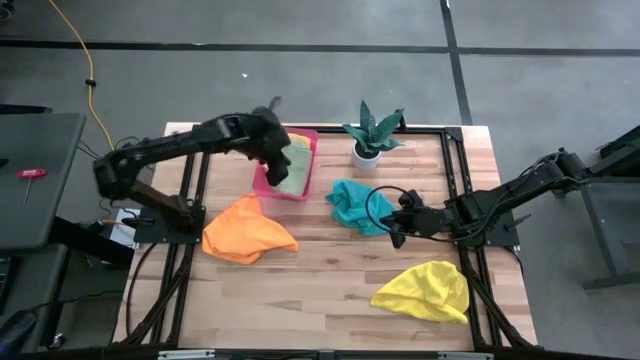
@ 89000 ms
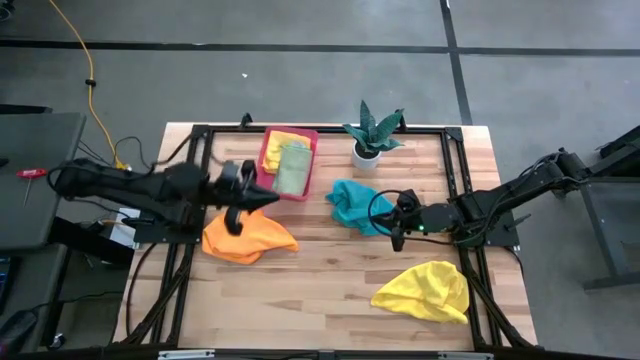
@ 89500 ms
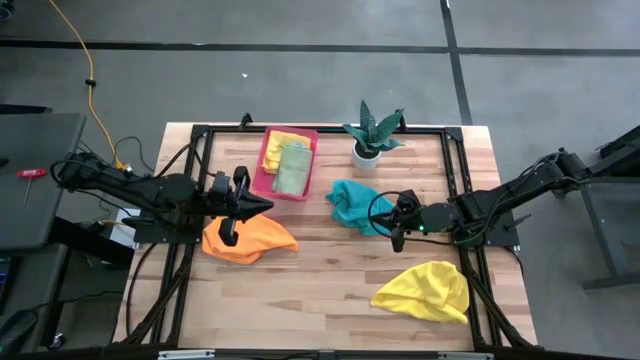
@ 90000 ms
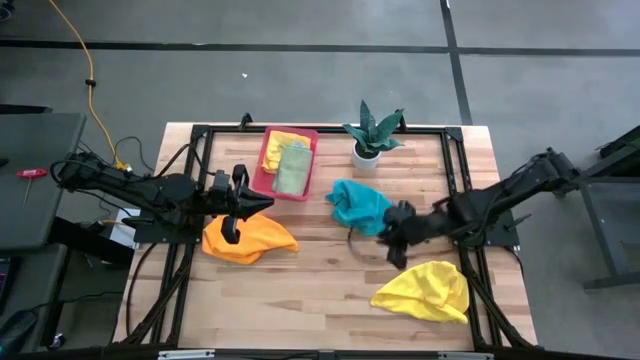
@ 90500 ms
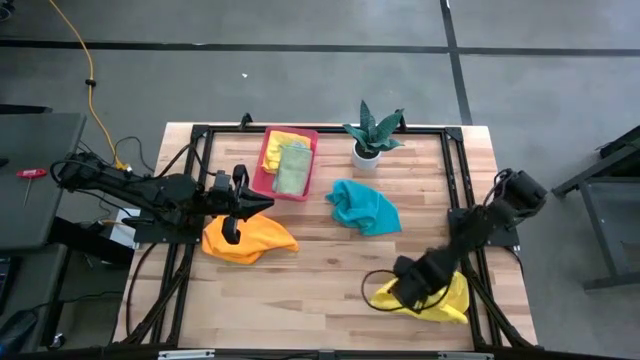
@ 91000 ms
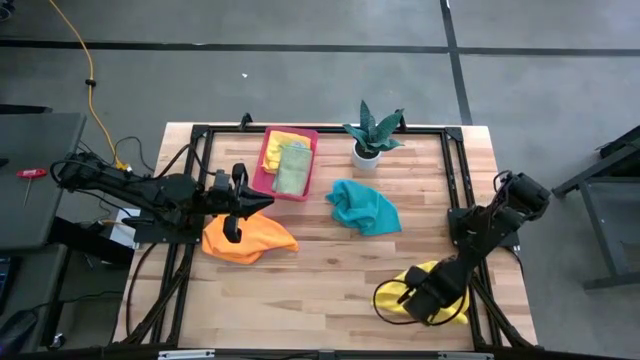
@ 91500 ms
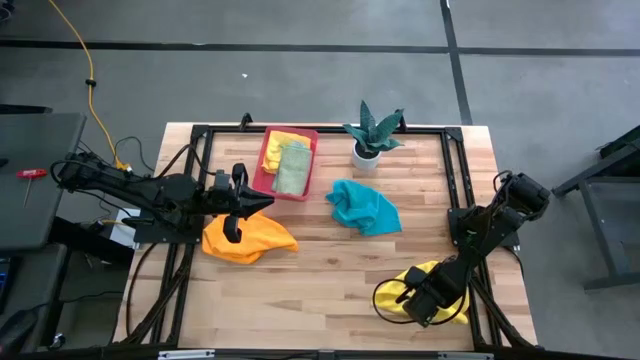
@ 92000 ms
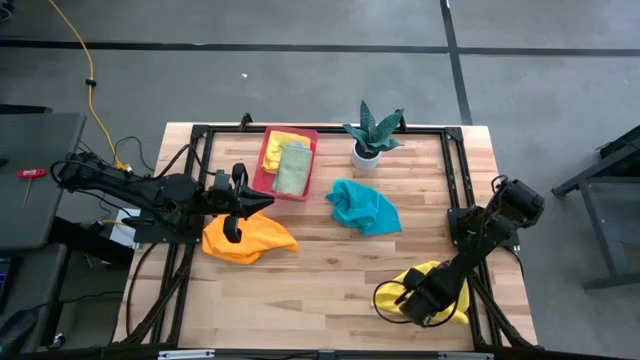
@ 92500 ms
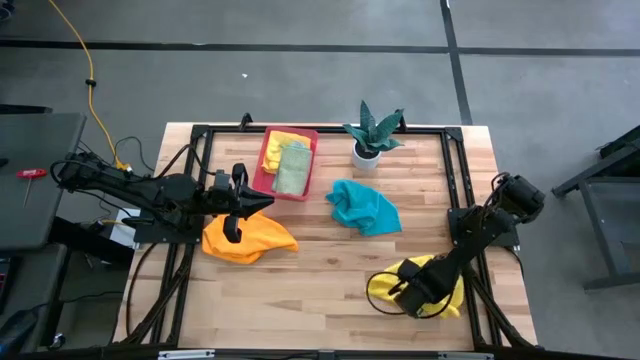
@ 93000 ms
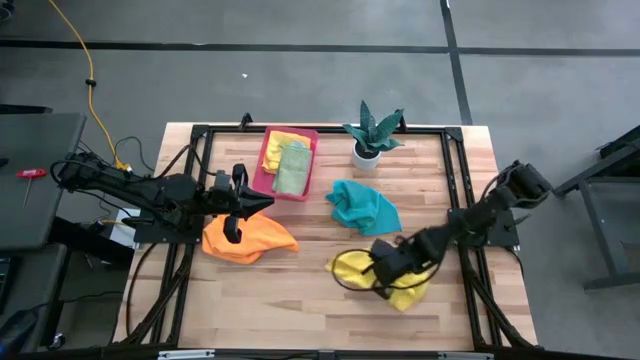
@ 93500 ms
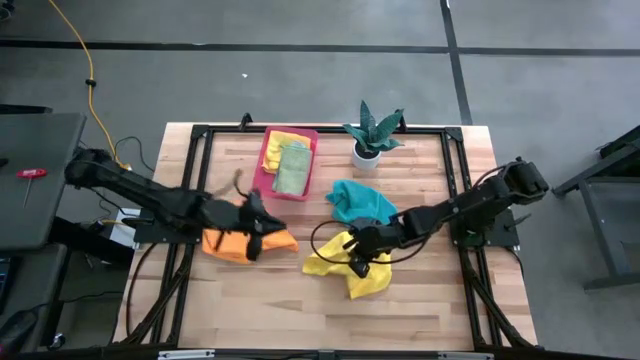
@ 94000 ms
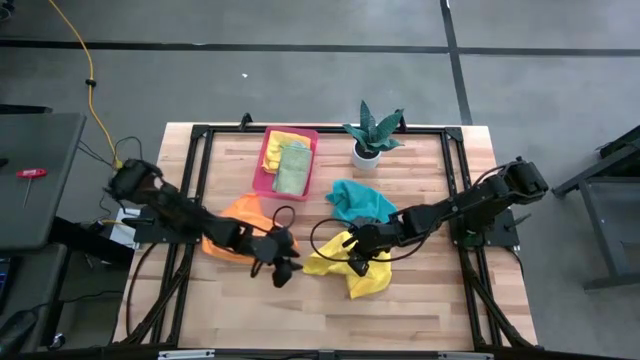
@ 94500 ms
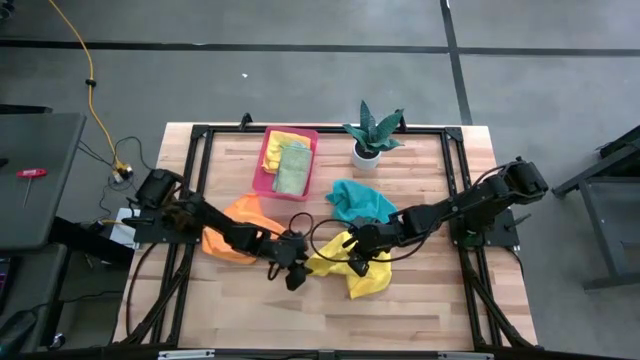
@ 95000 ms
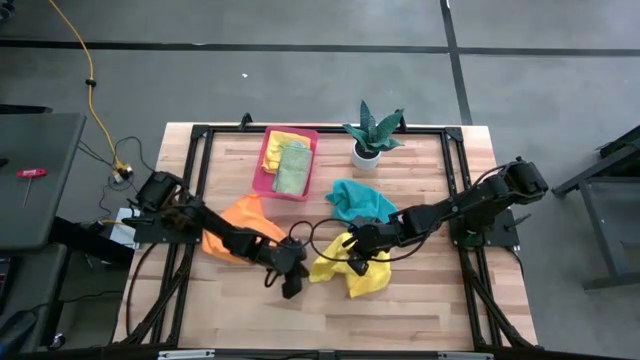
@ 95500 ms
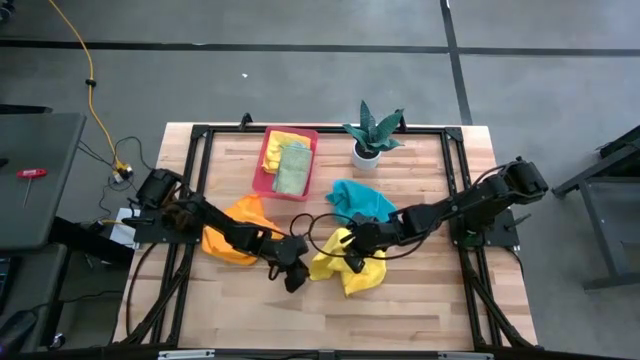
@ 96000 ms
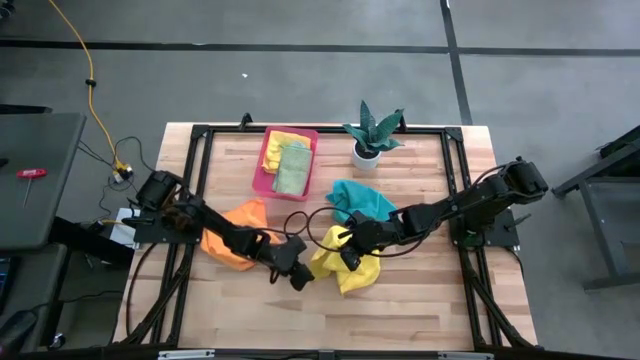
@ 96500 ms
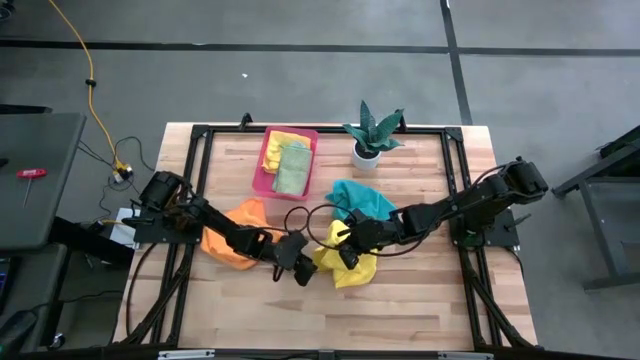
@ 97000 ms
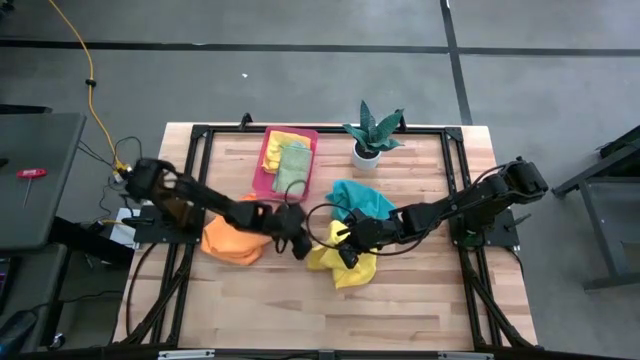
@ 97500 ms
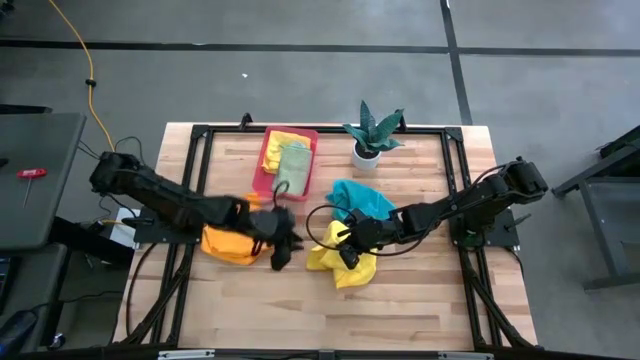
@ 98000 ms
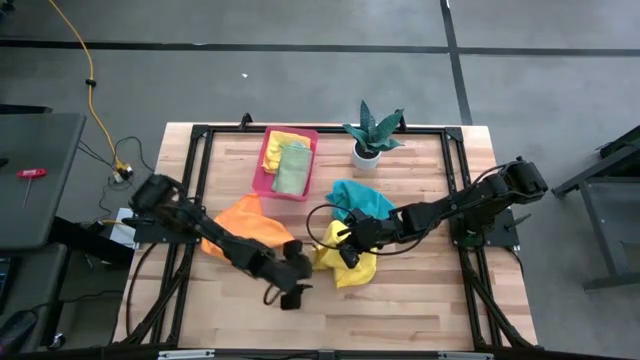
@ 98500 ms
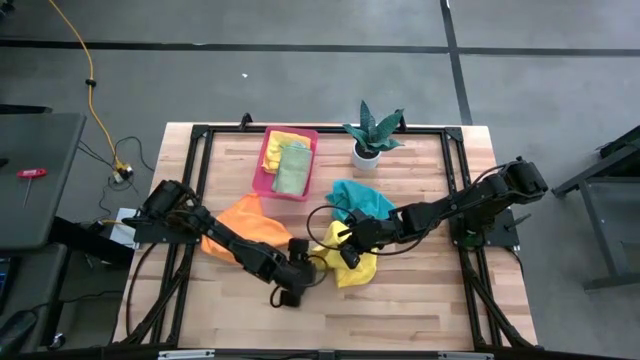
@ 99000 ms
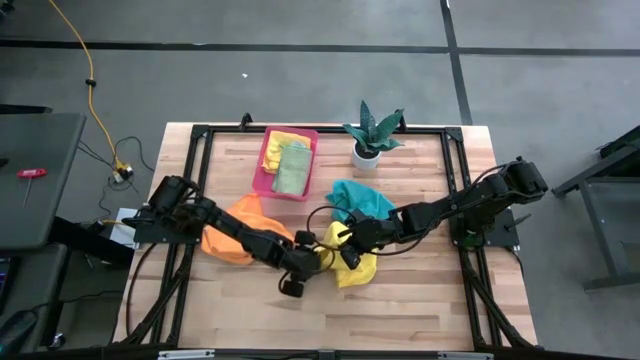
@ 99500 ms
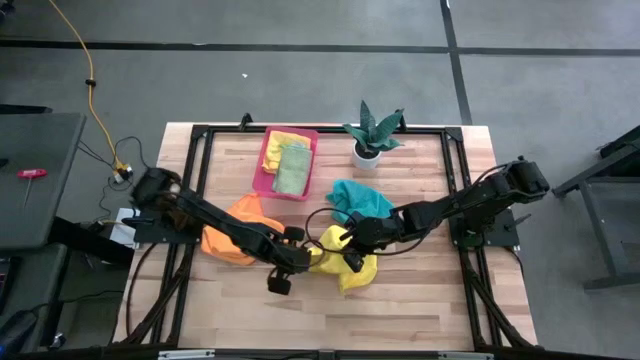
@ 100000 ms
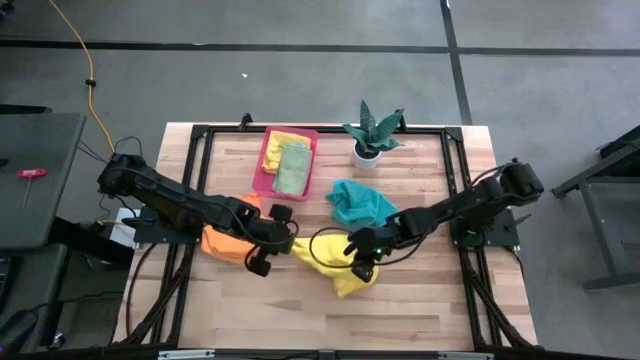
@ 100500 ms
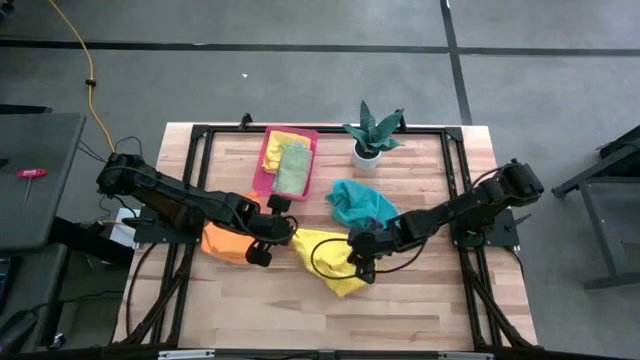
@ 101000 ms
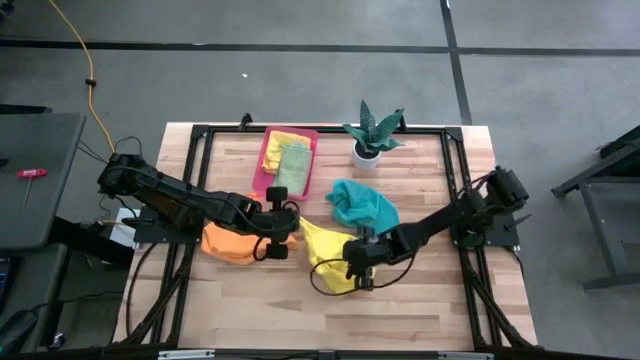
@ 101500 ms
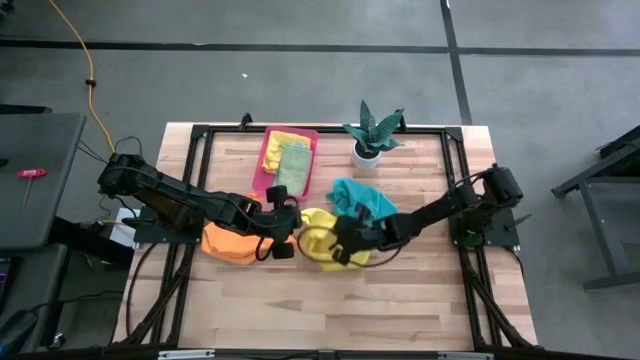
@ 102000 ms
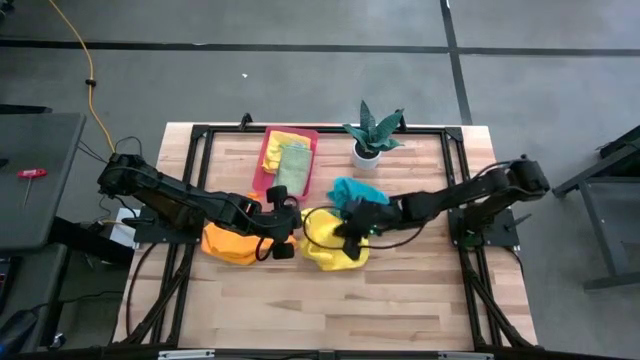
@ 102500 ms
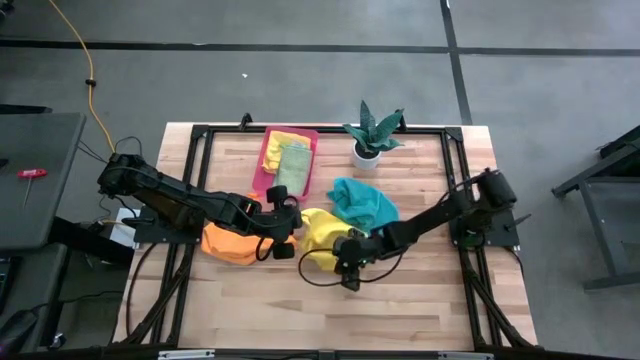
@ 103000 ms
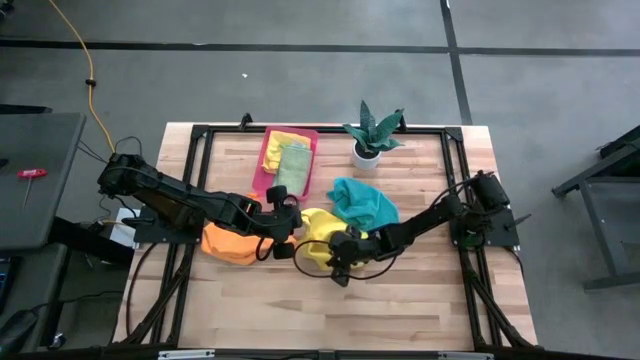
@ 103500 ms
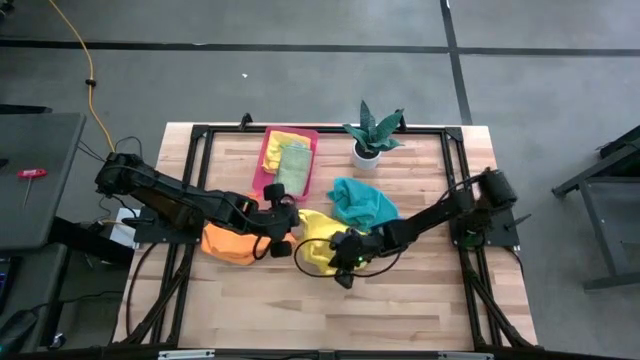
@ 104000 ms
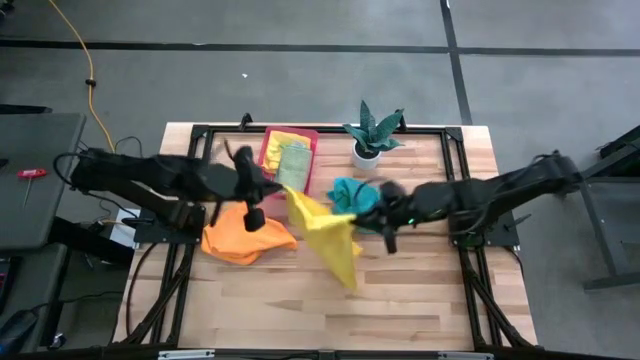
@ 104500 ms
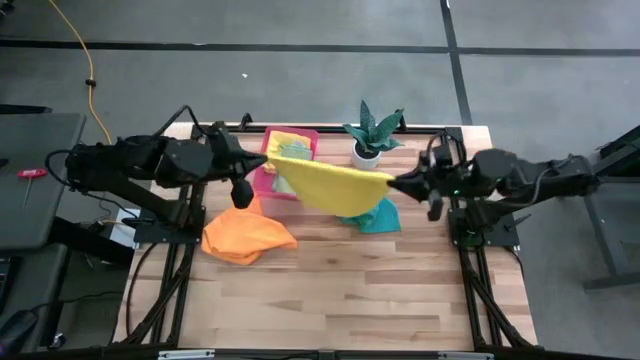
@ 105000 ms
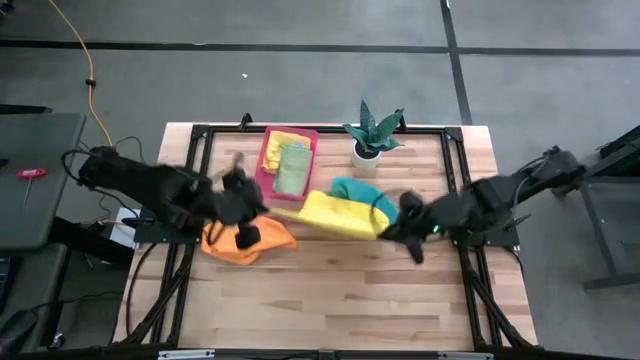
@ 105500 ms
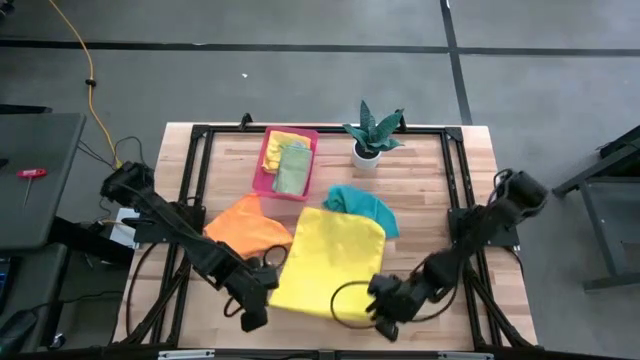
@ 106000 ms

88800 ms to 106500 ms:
Task: Fold microfiber towels
Fold the yellow microfiber cloth

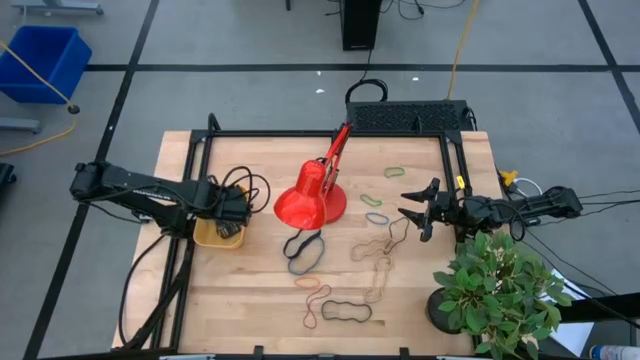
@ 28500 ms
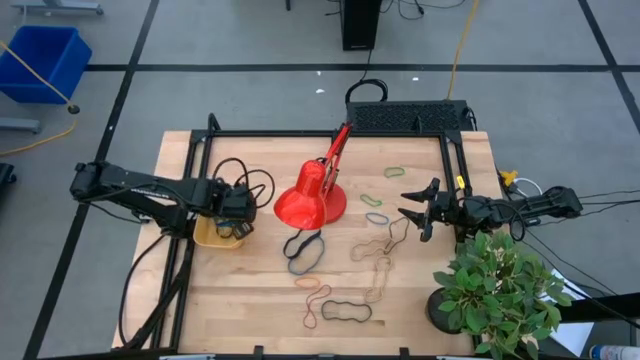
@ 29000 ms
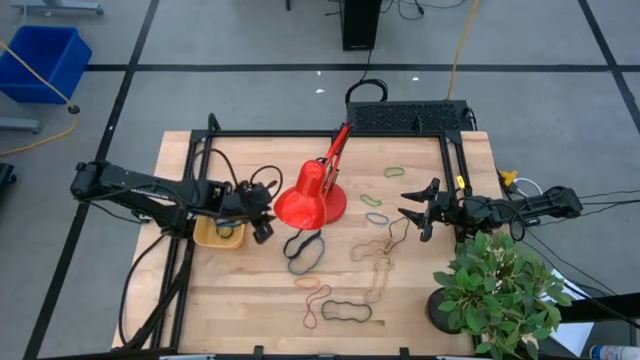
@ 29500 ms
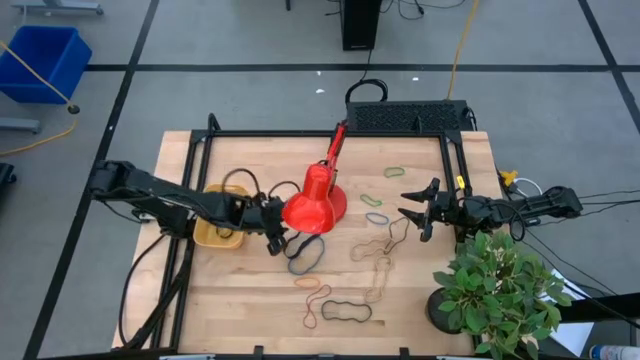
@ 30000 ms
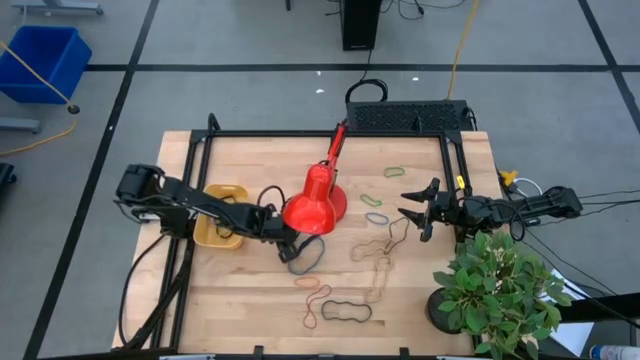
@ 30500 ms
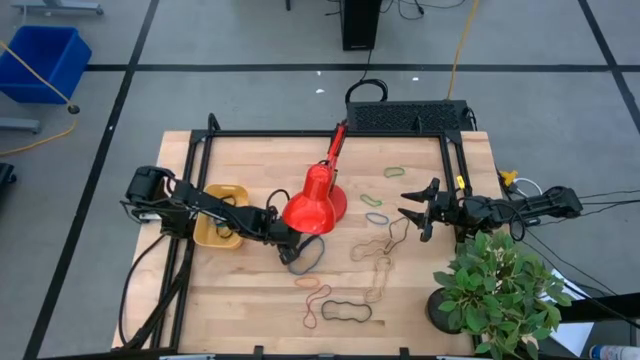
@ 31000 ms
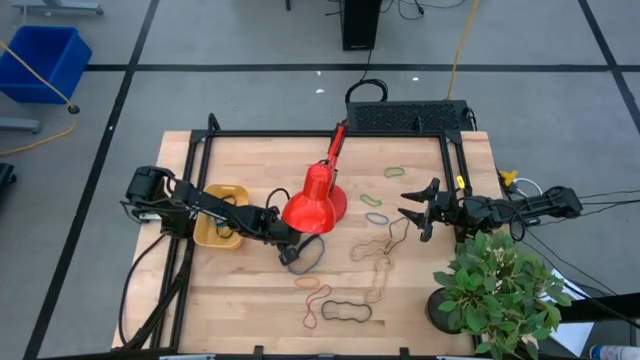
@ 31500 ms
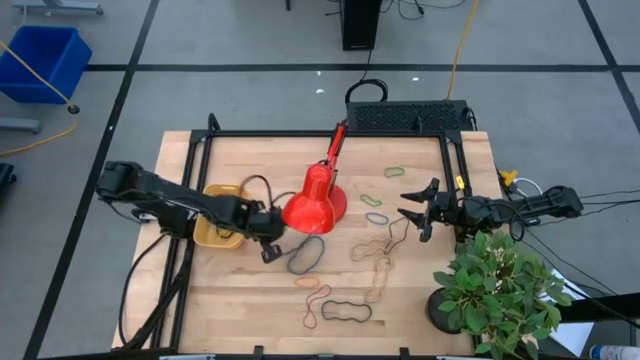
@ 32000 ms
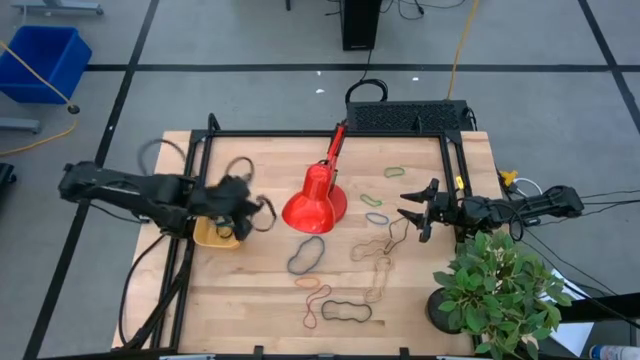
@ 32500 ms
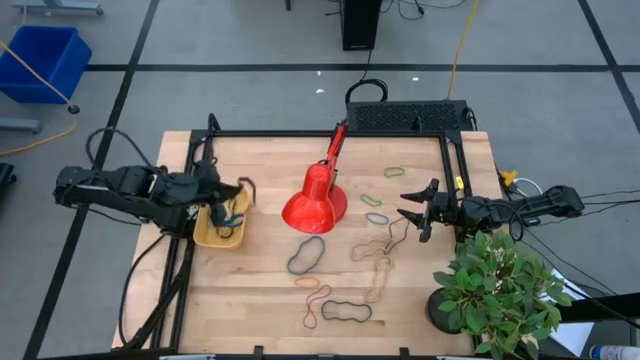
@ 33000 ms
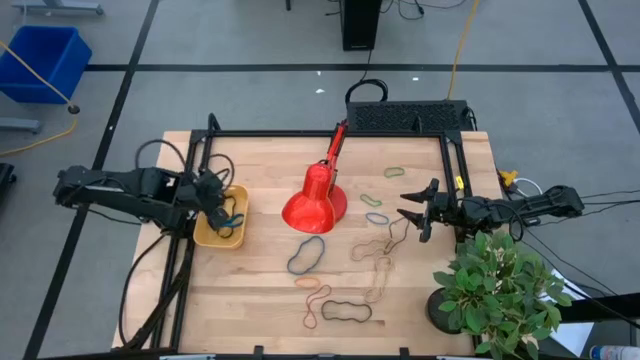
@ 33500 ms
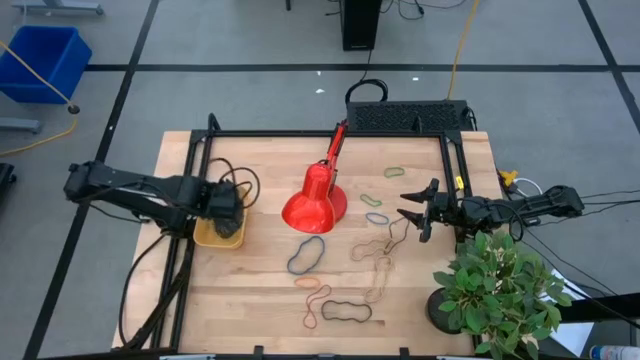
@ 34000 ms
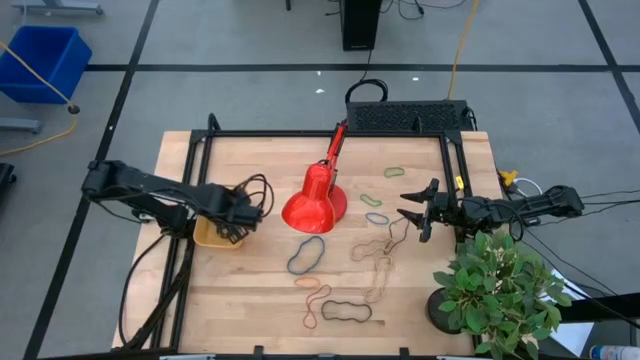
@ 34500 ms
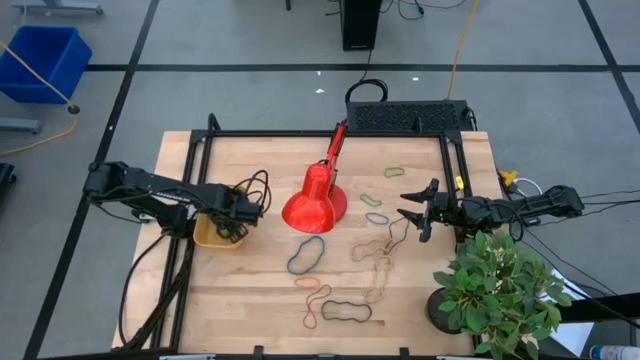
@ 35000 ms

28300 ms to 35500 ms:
Task: Pick and place rubber bands into bin
Put the top black rubber band into the yellow bin
